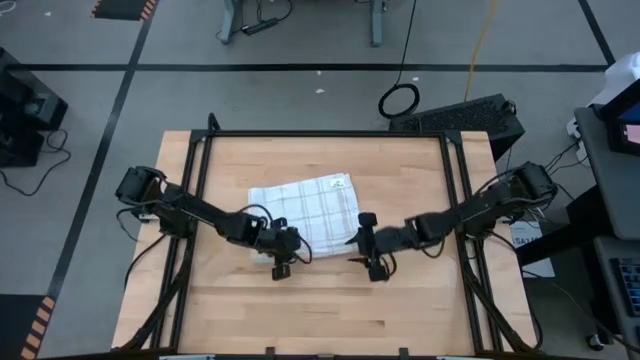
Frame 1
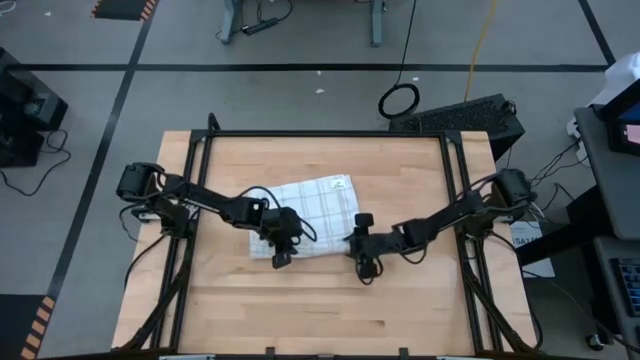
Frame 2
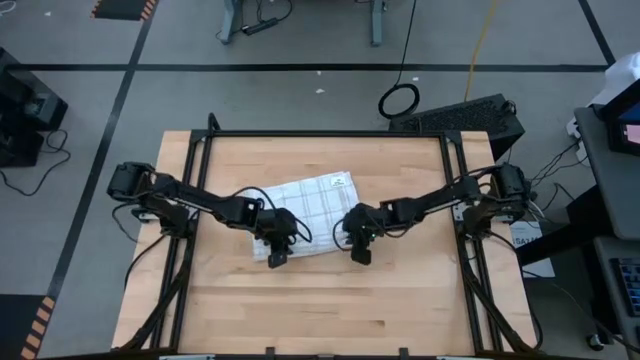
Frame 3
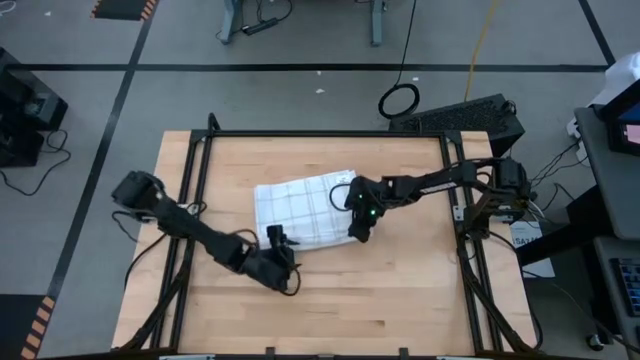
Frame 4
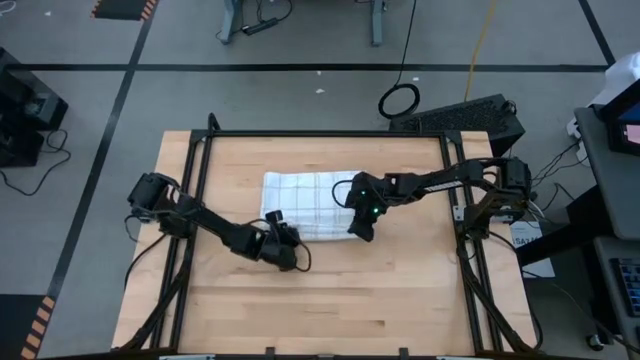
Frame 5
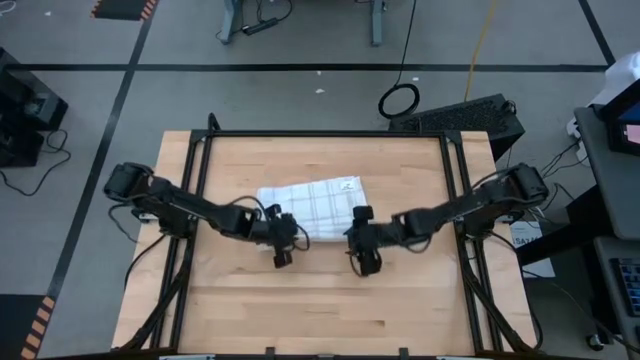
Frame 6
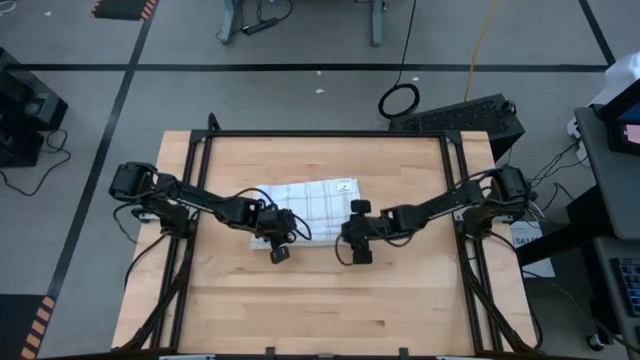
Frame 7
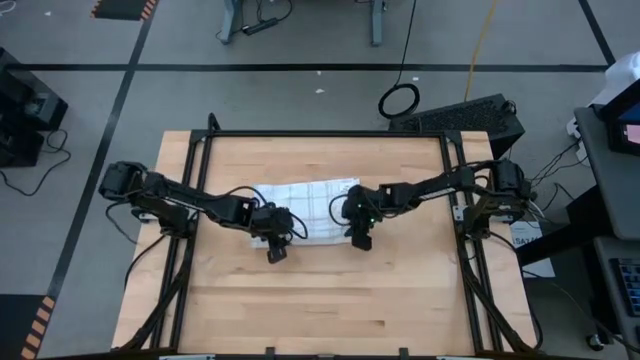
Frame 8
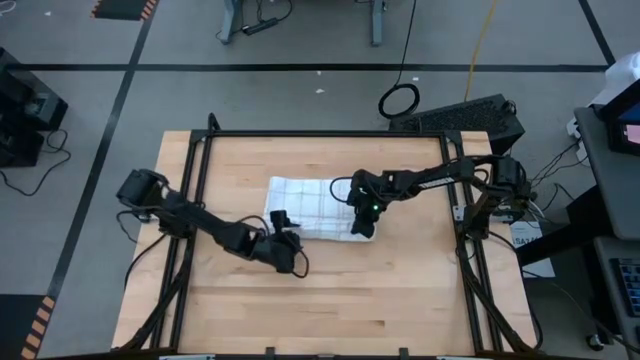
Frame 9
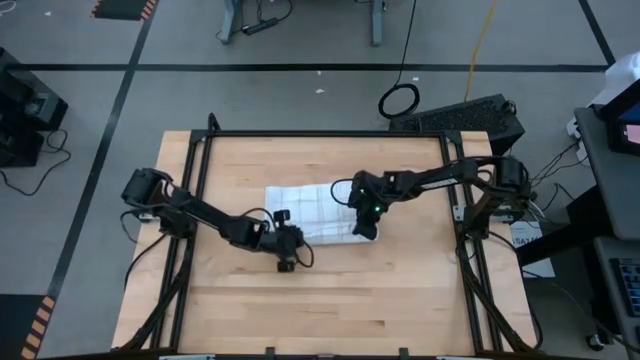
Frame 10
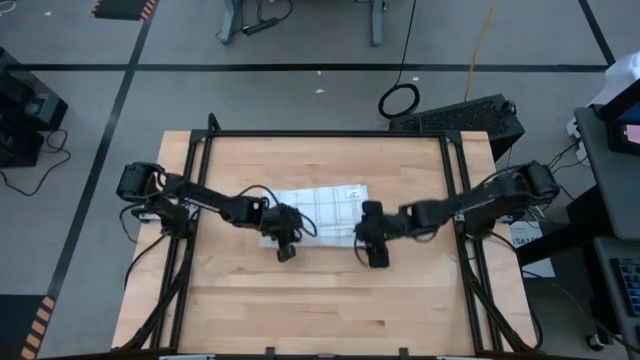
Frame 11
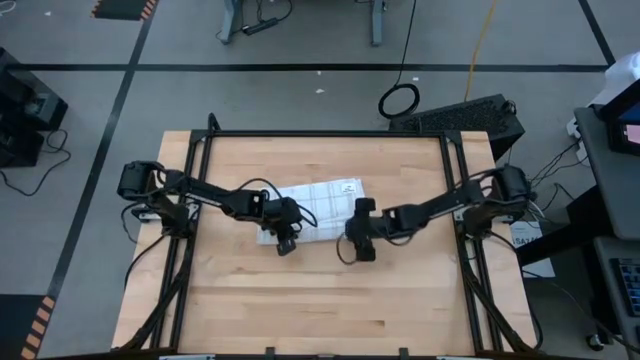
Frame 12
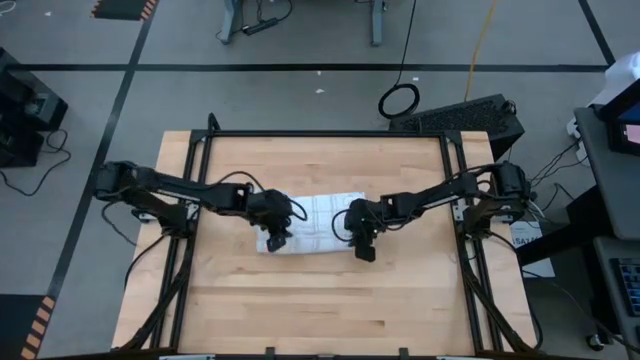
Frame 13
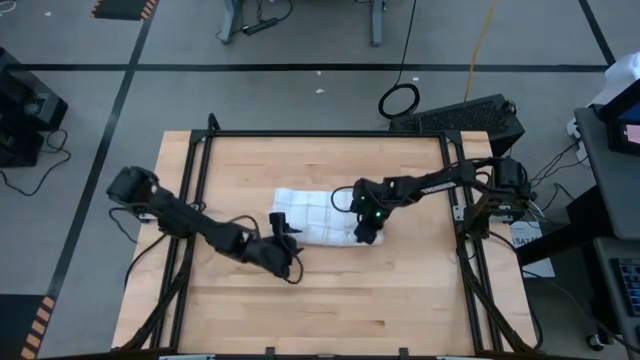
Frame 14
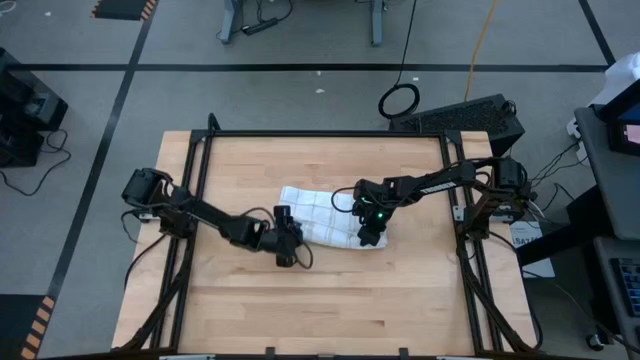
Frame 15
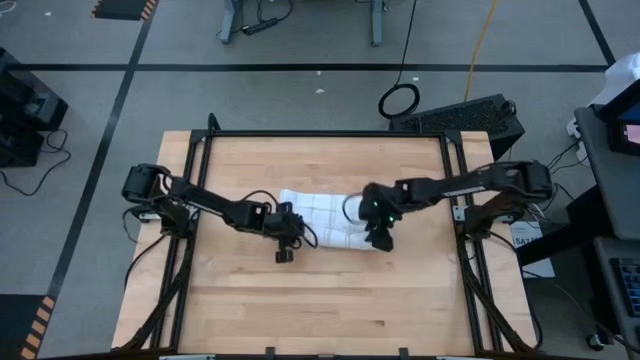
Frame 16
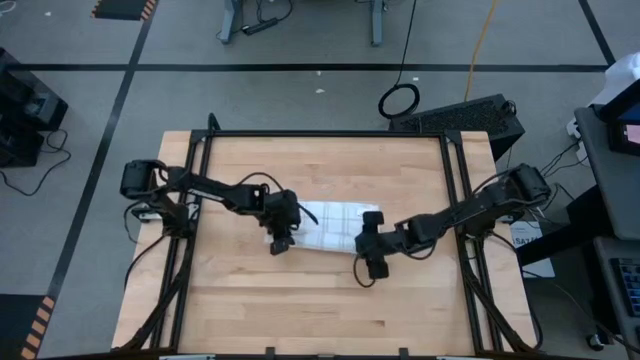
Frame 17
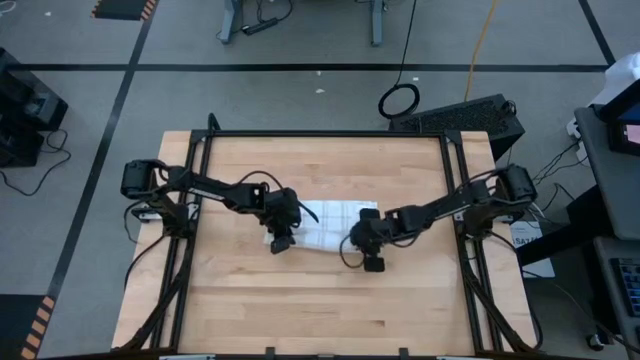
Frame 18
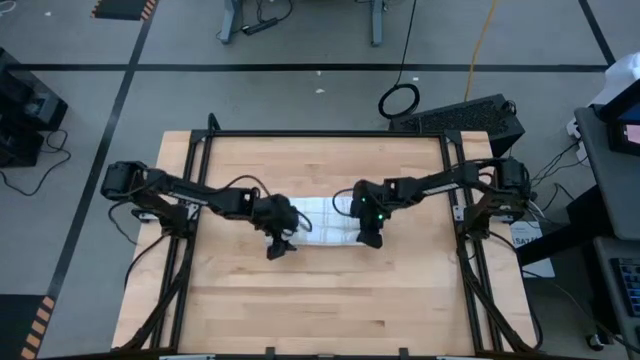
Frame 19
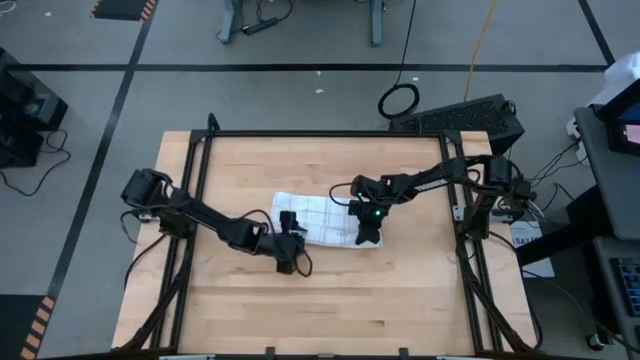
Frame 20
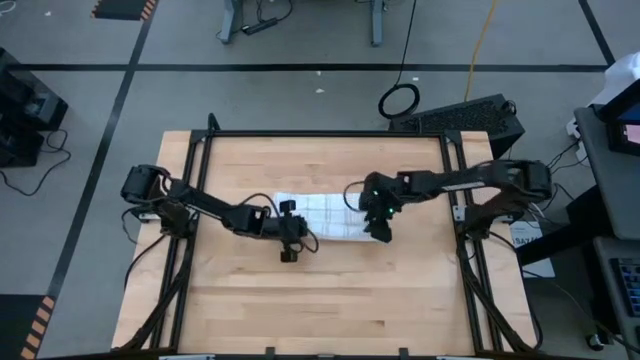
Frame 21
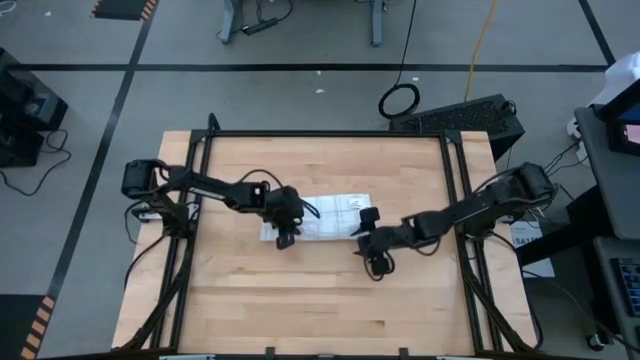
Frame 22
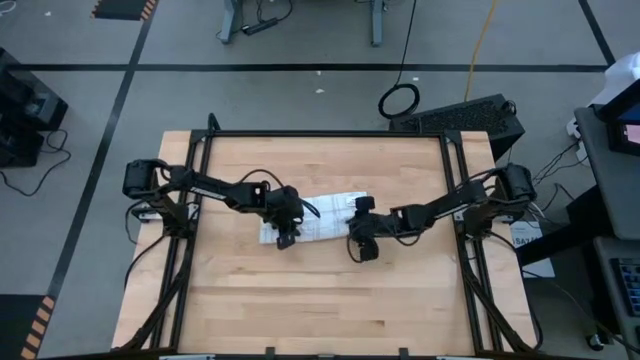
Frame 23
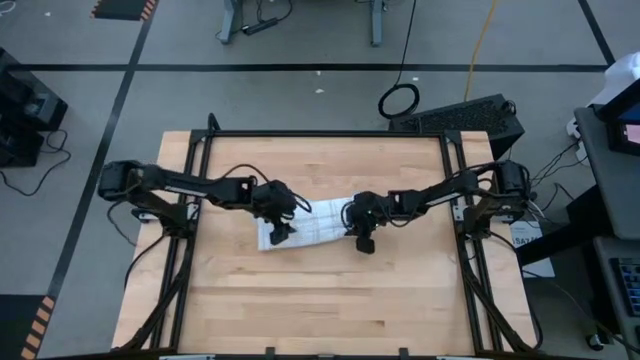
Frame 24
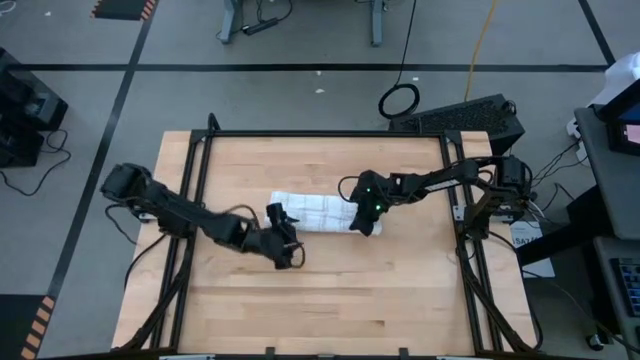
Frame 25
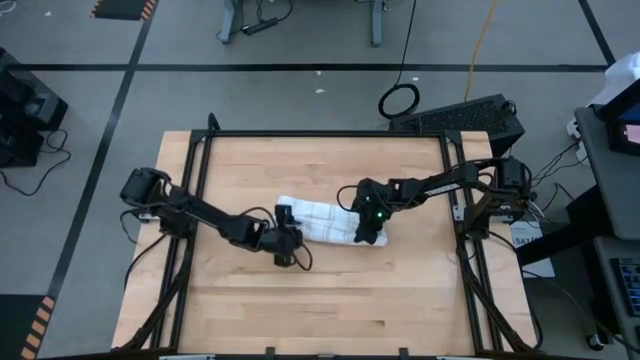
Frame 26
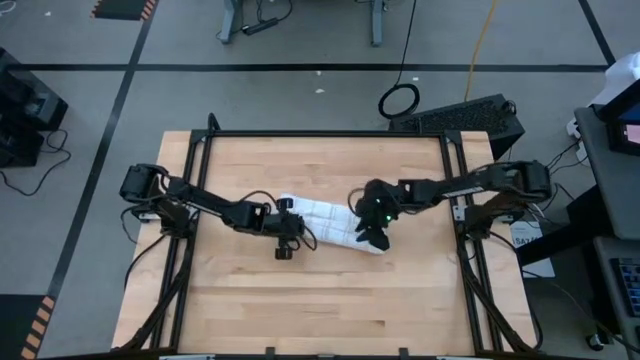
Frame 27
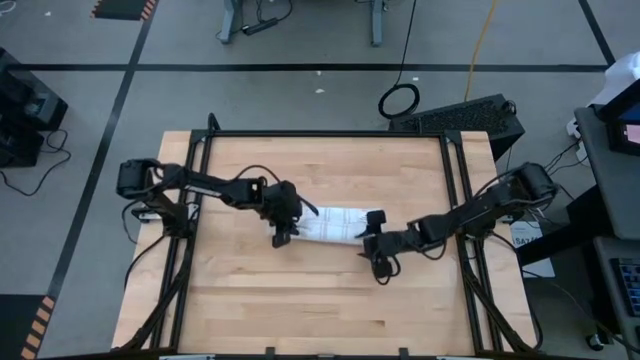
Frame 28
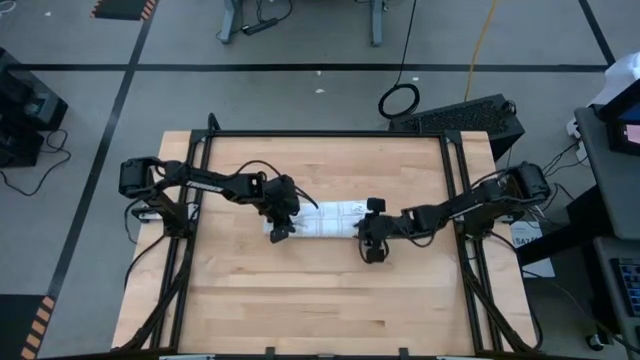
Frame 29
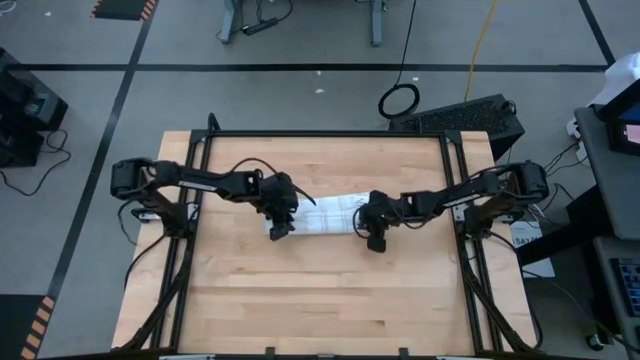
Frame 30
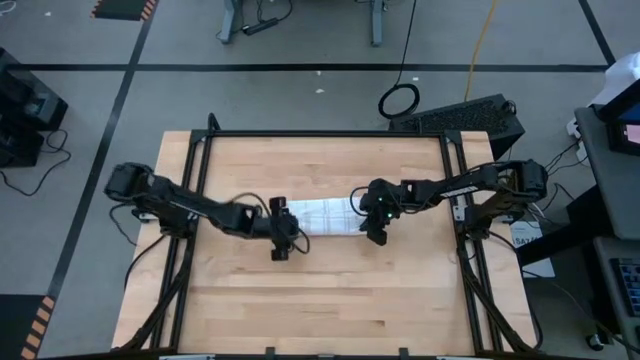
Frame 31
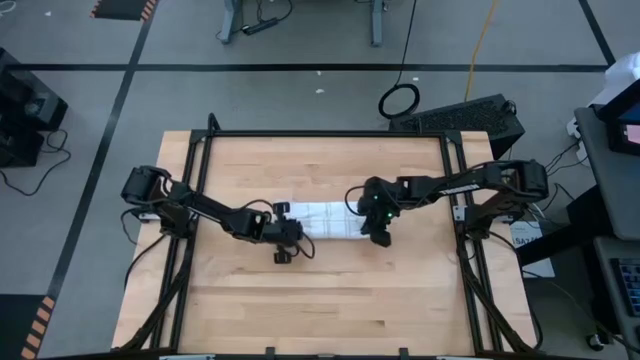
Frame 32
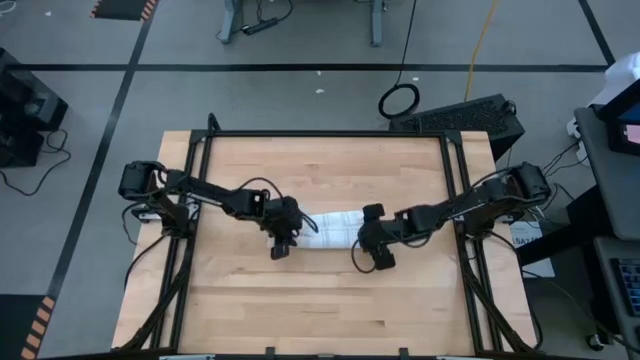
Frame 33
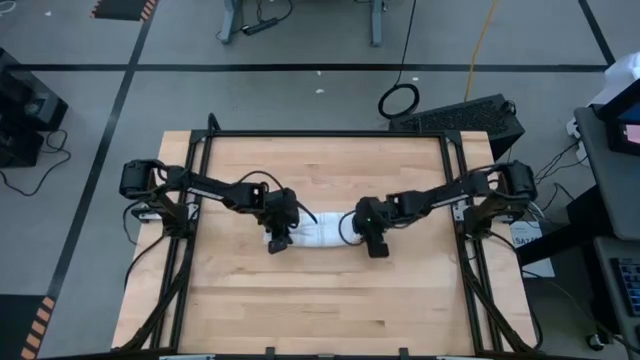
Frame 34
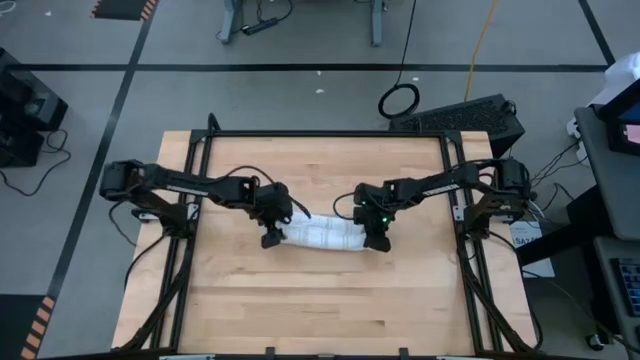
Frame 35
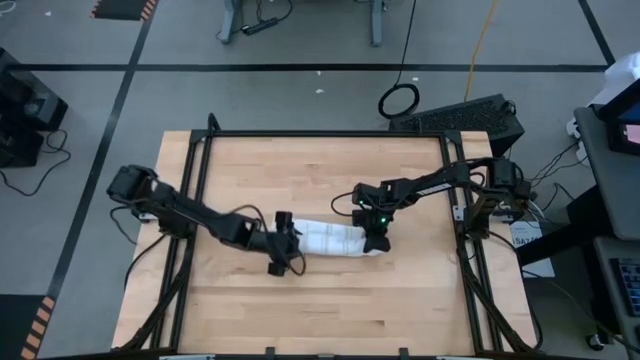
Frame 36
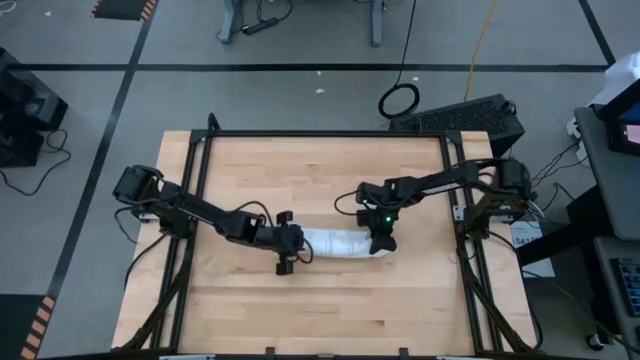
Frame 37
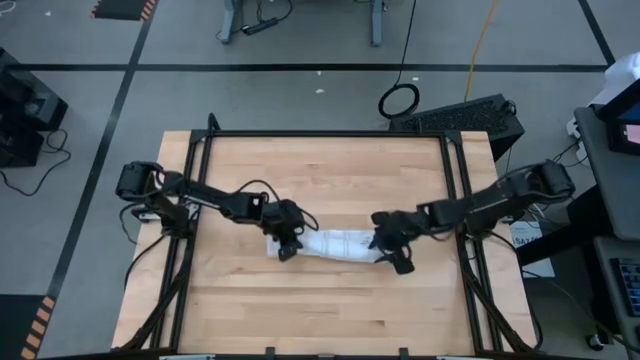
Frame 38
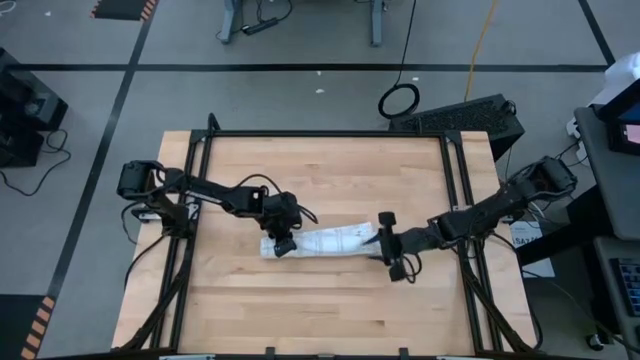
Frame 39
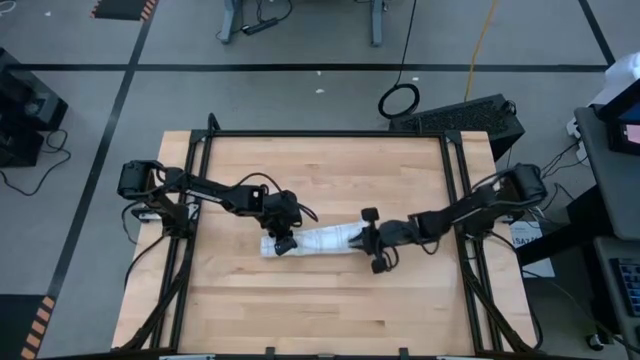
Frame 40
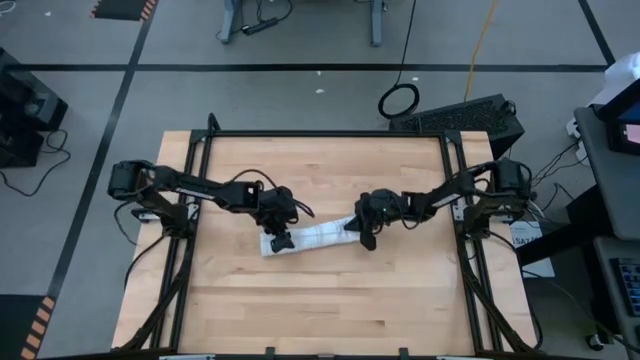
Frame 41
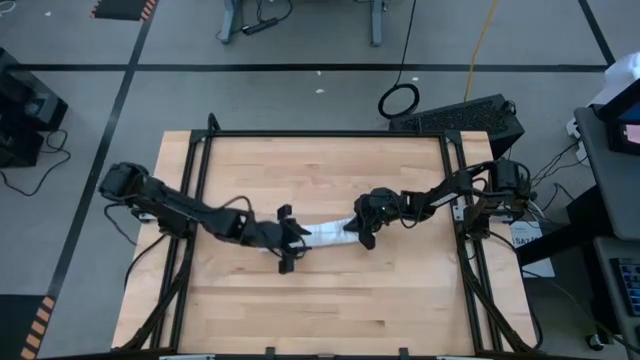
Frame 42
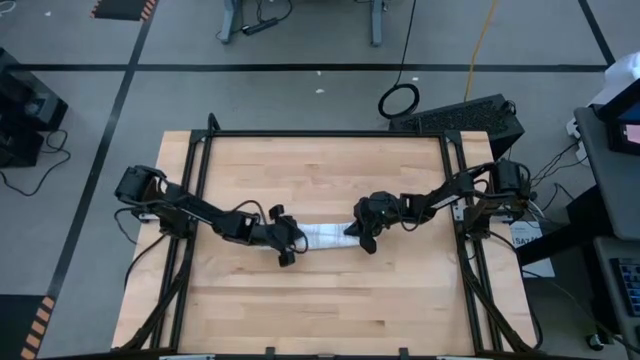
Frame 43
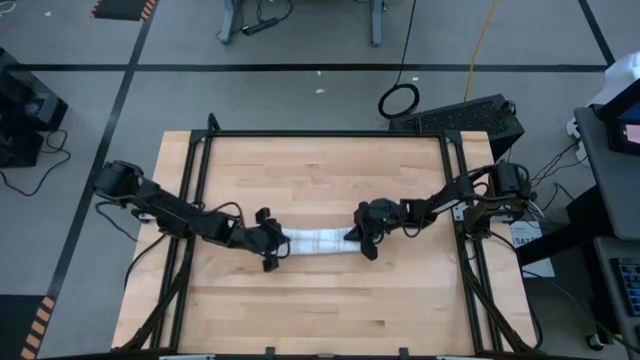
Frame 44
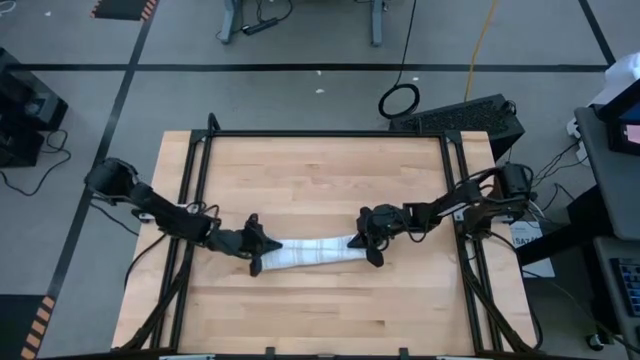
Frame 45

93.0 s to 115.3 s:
Task: Roll towel
Roll the white towel
